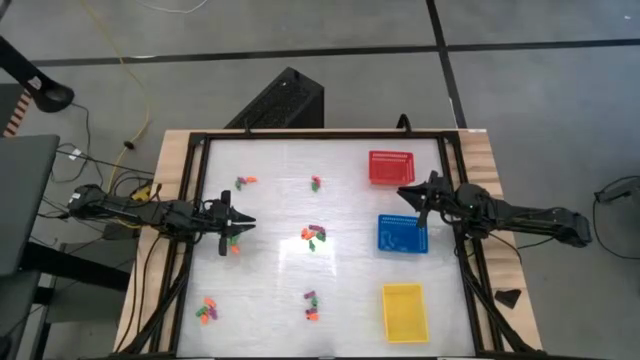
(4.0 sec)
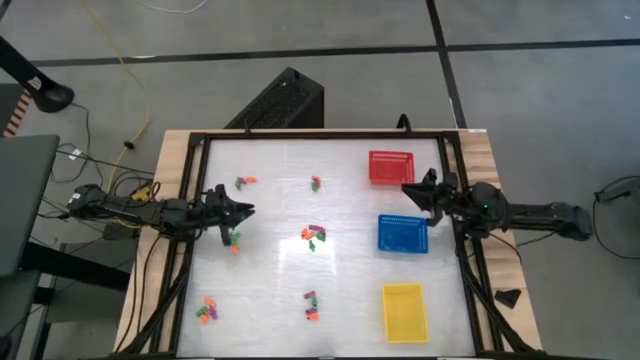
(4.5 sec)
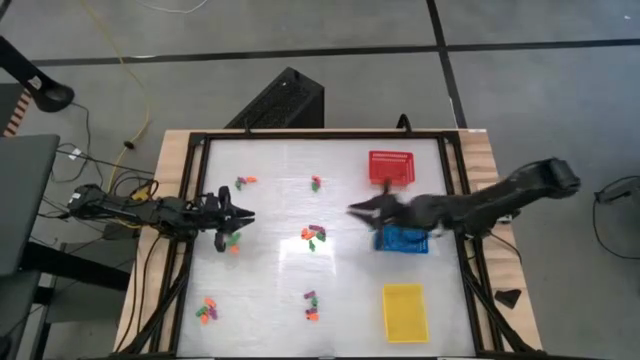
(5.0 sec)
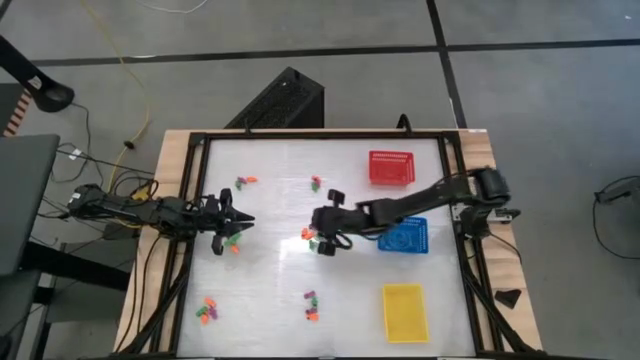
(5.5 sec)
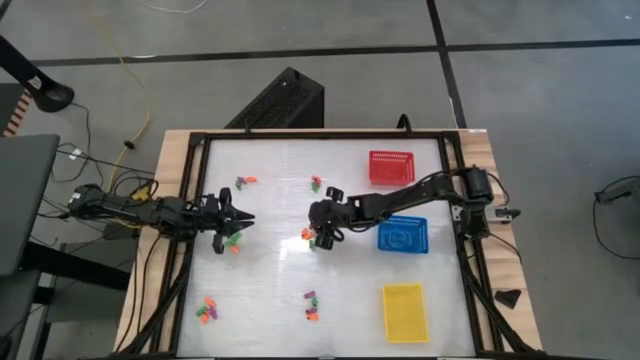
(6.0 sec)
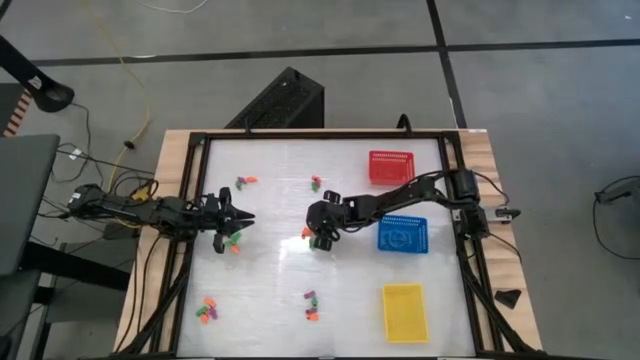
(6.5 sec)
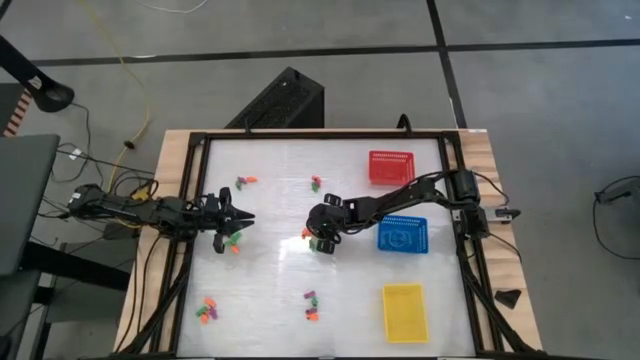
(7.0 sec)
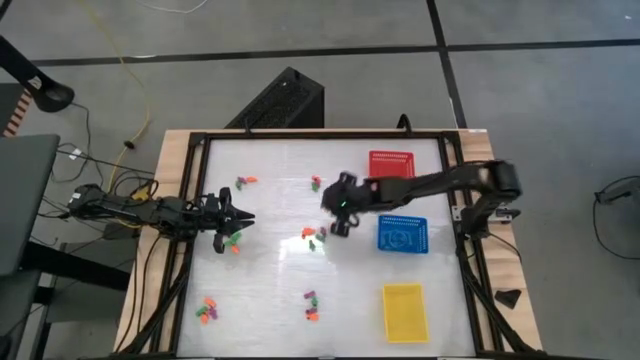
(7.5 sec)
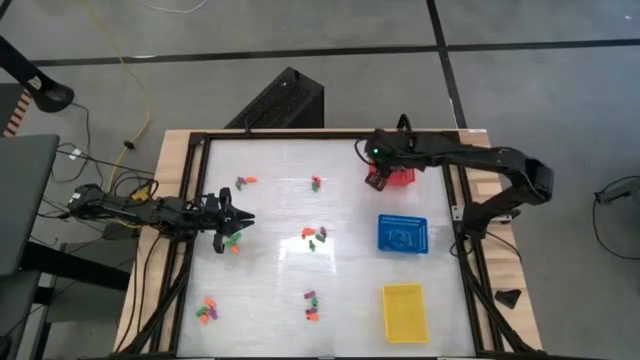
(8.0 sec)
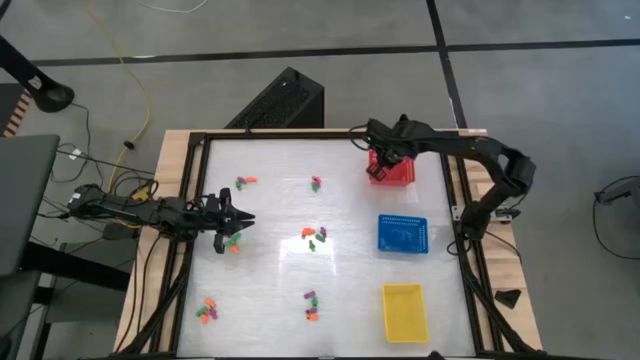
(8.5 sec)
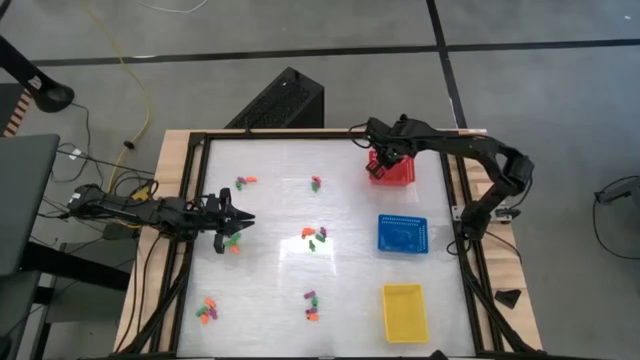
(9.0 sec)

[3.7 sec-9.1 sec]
Task: Sort Halloween decoration
Put the violet skeleton toy into the red basket

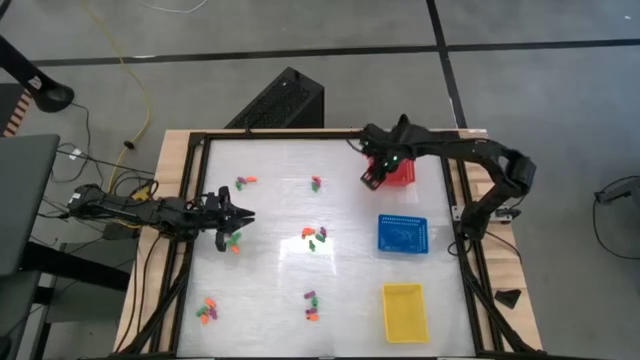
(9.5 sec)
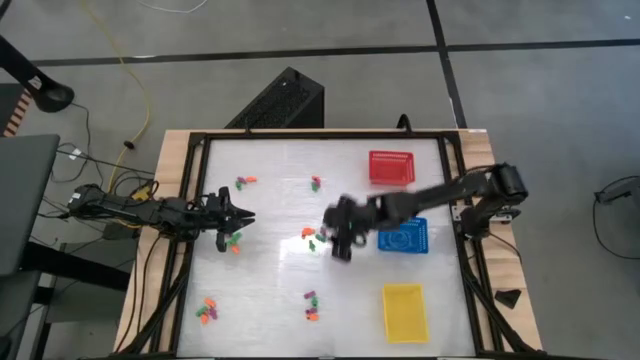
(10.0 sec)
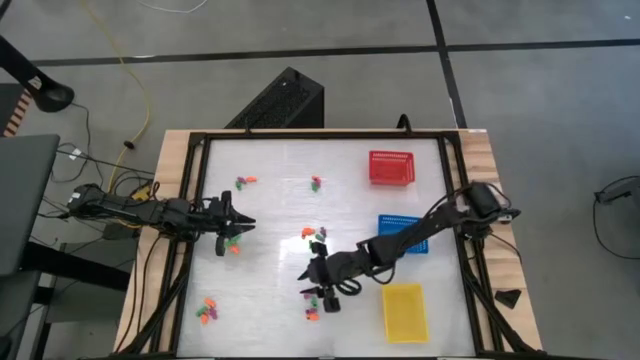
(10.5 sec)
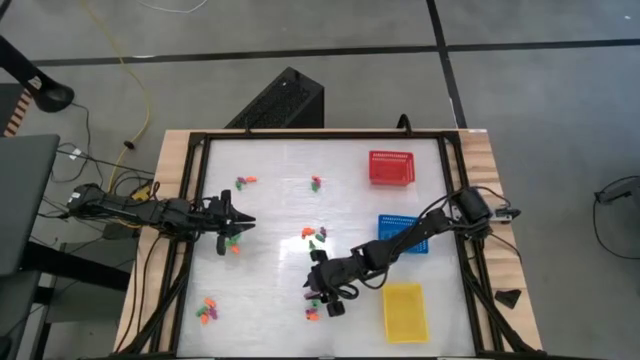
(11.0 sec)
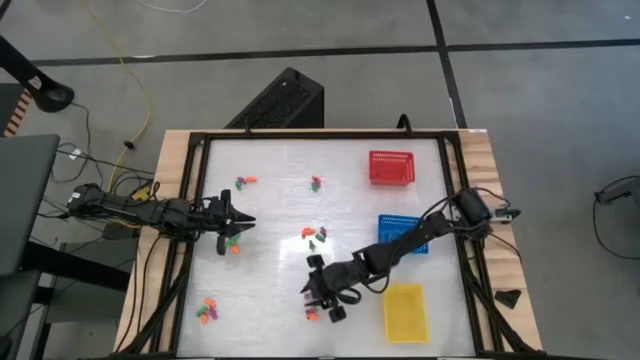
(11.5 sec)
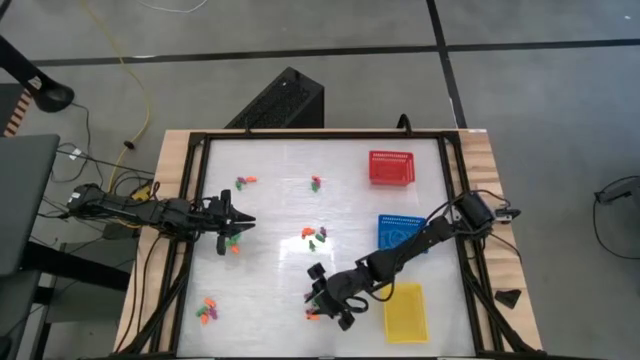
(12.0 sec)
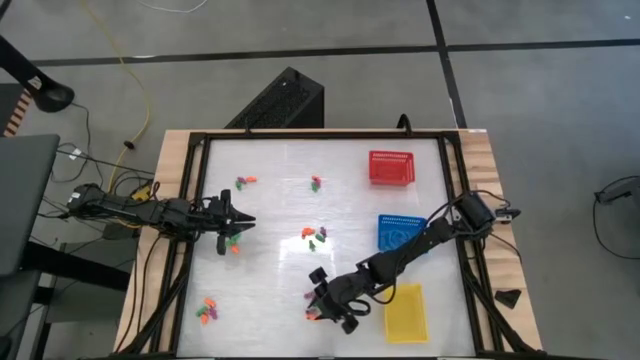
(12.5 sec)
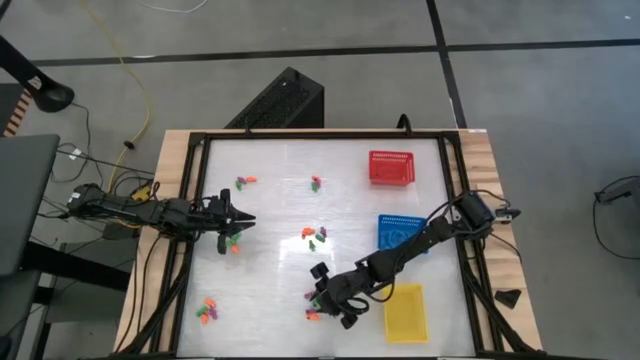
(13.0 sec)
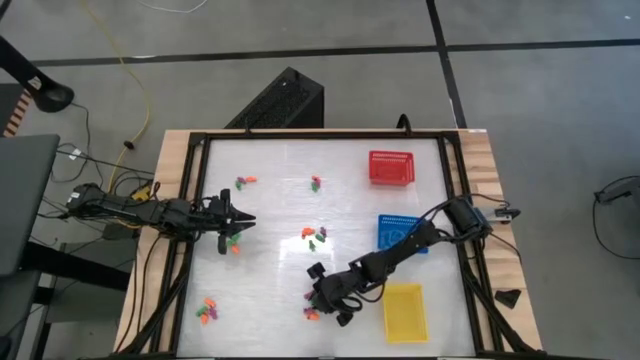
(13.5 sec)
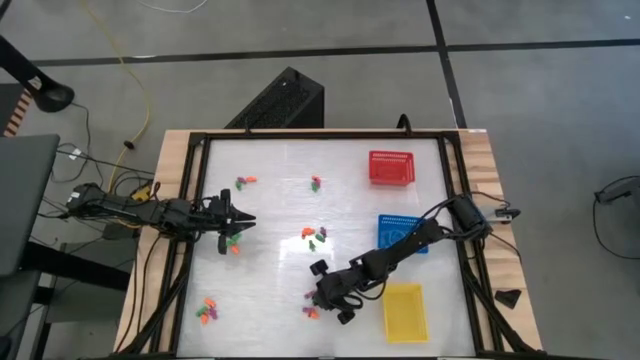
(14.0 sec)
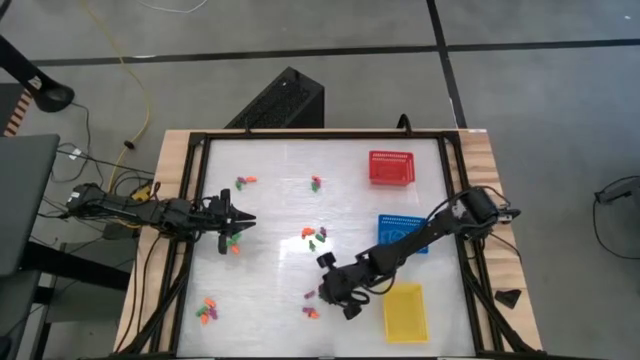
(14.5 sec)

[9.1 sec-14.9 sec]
Put the green skeleton toy into the blue basket

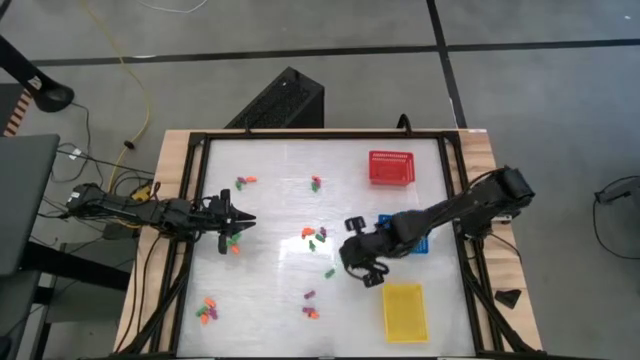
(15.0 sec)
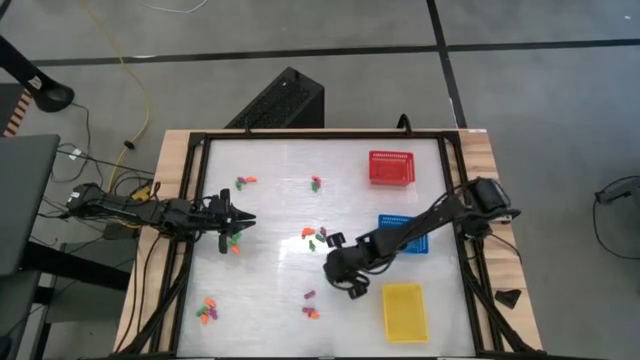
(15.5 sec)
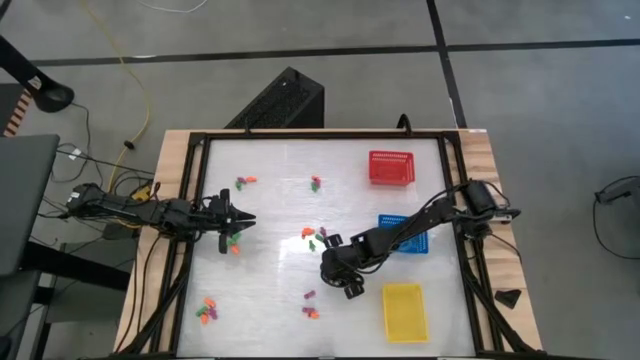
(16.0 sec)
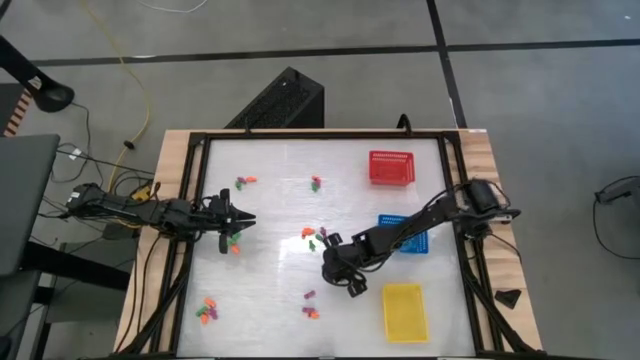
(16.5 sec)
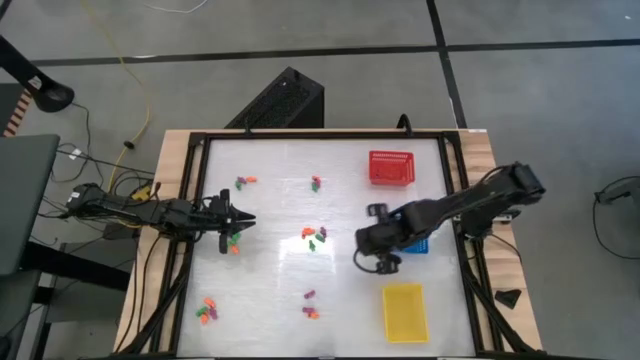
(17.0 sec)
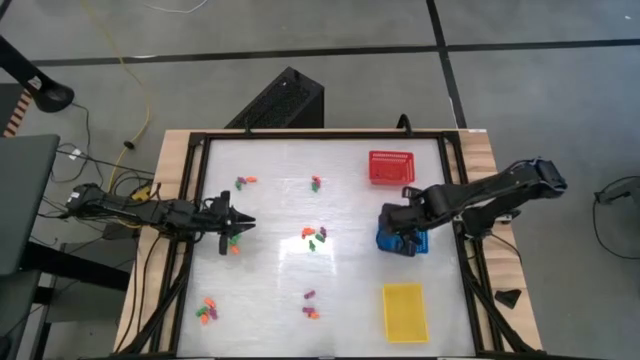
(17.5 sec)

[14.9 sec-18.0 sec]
Put the green skeleton toy into the blue basket

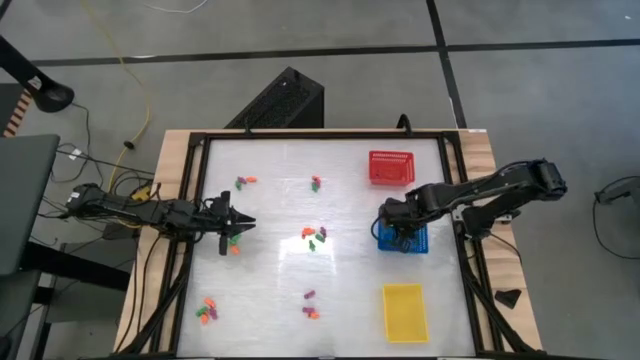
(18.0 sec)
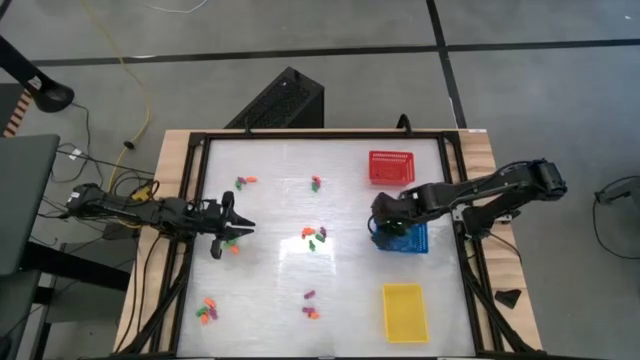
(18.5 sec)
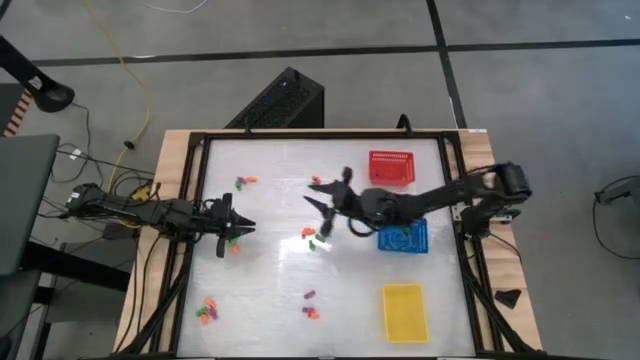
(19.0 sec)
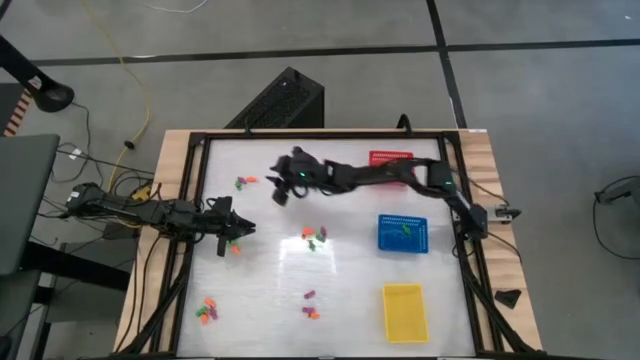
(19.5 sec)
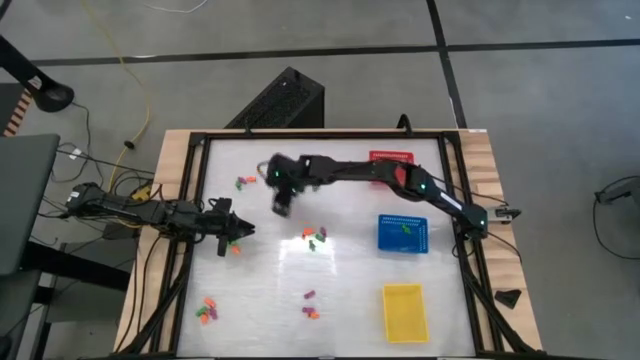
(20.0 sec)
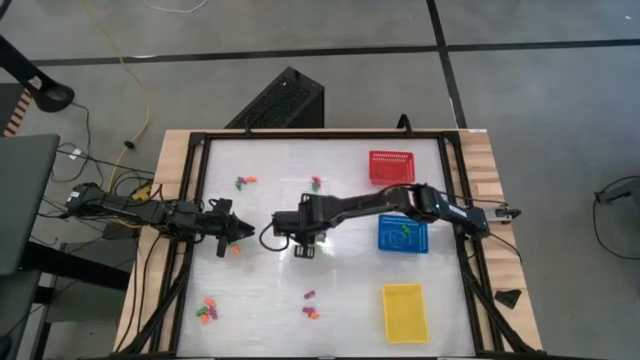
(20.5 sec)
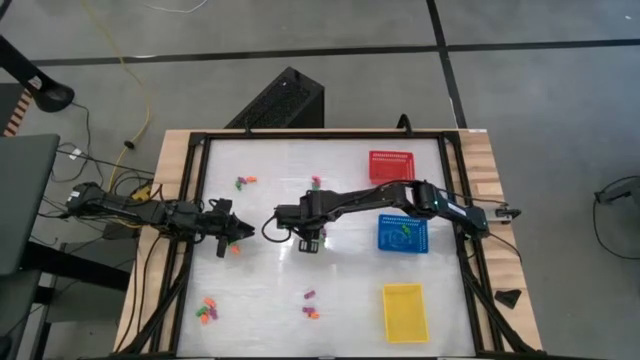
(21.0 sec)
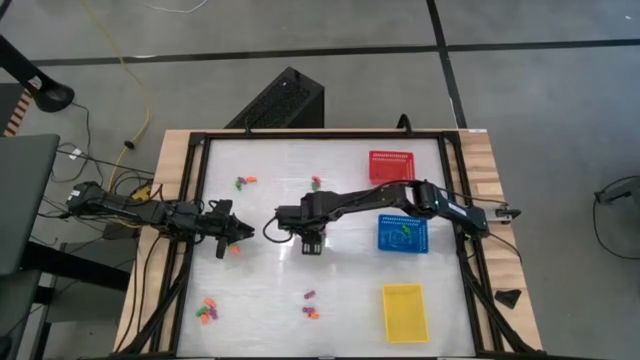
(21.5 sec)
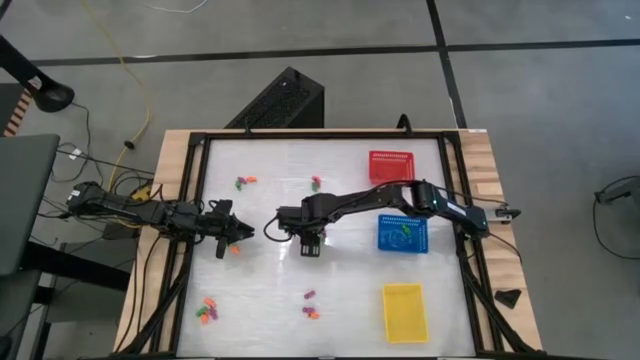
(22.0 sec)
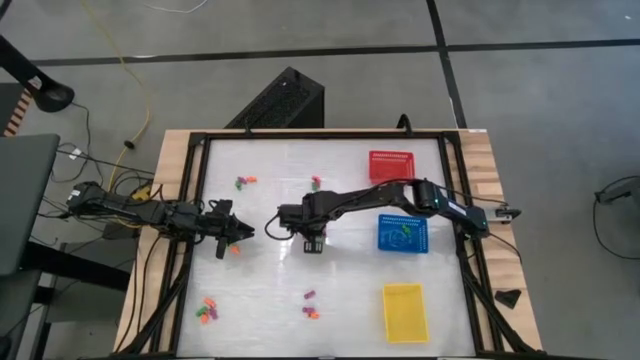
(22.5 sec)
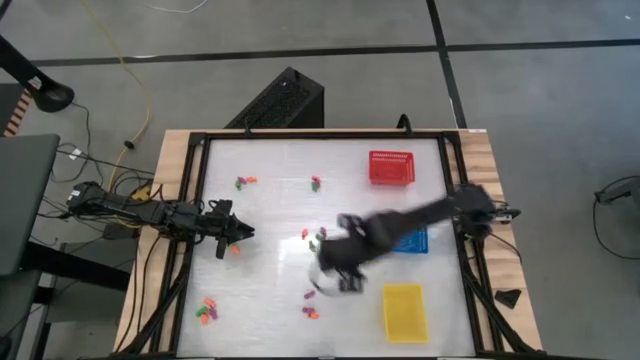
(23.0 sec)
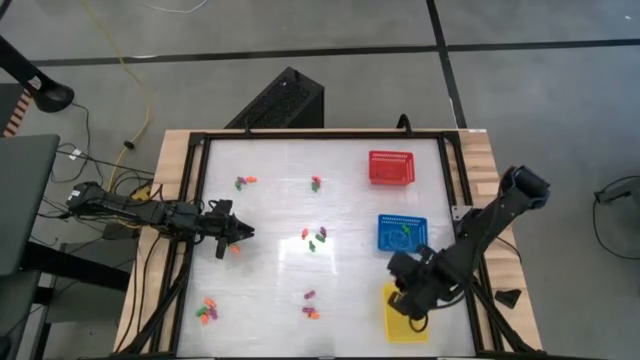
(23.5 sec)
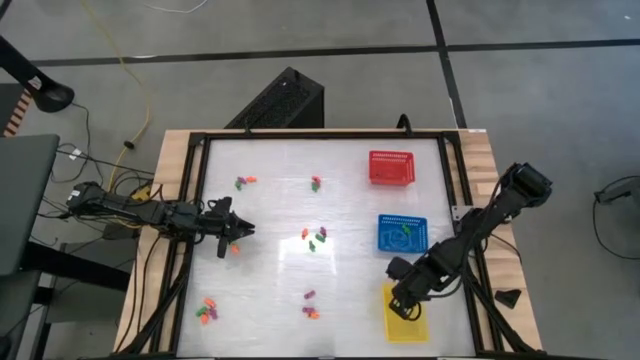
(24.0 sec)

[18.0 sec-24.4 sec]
Put the orange skeleton toy into the yellow basket
